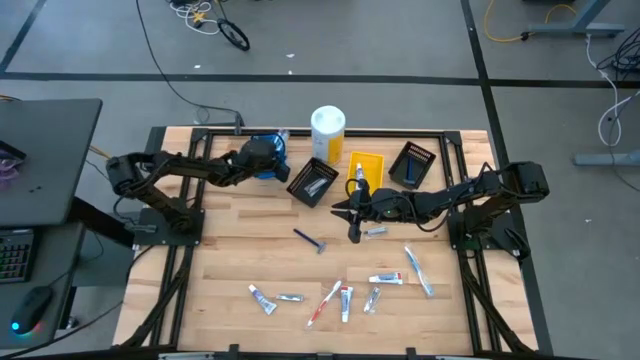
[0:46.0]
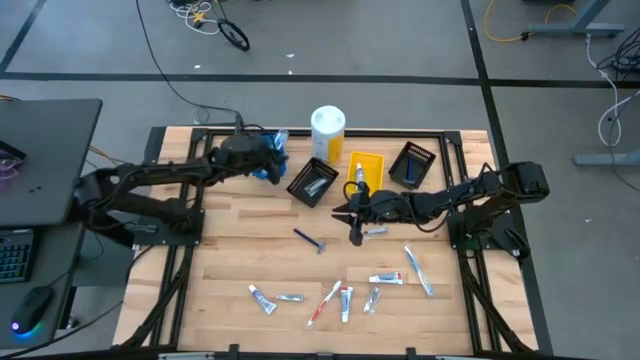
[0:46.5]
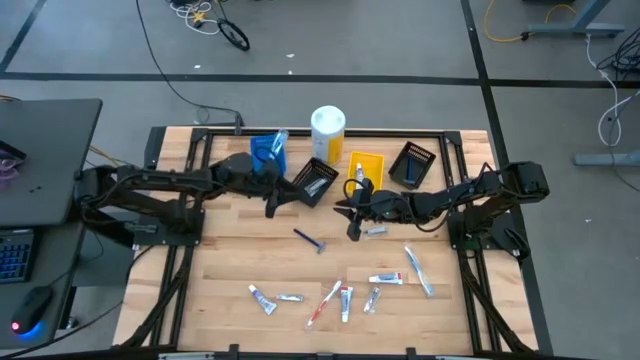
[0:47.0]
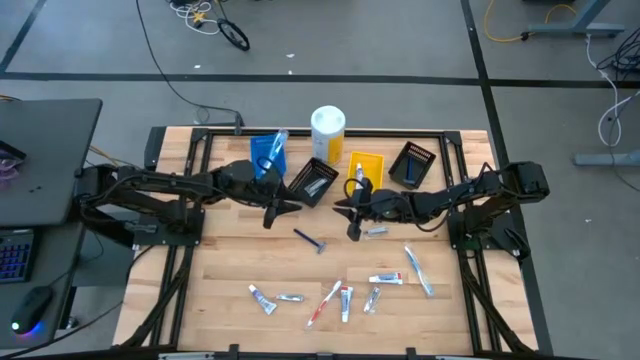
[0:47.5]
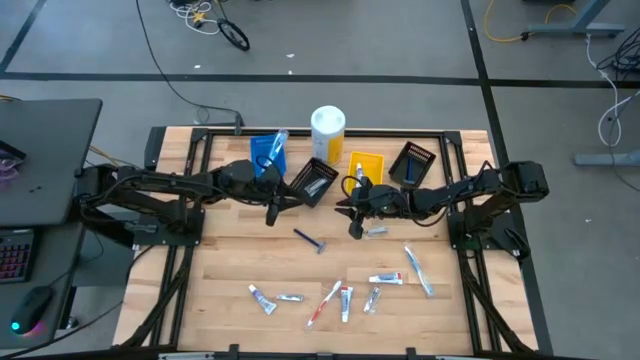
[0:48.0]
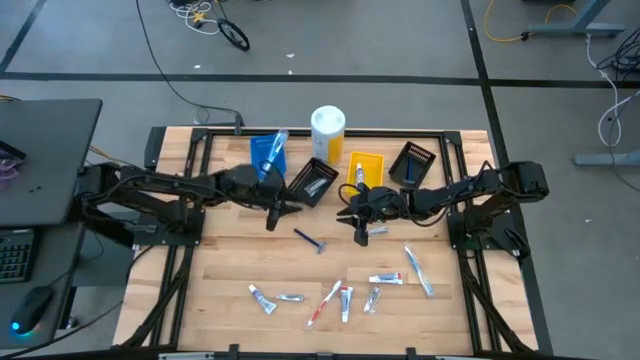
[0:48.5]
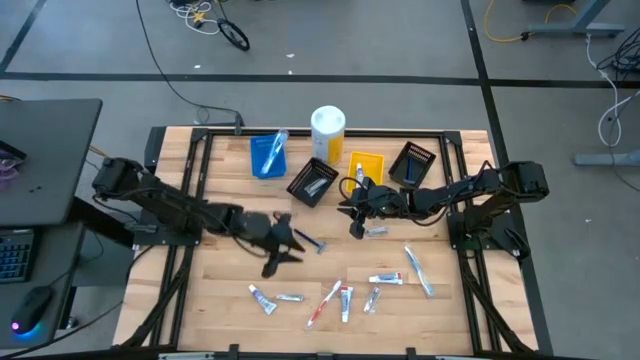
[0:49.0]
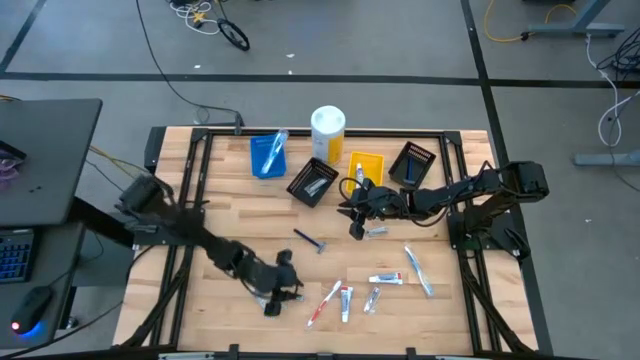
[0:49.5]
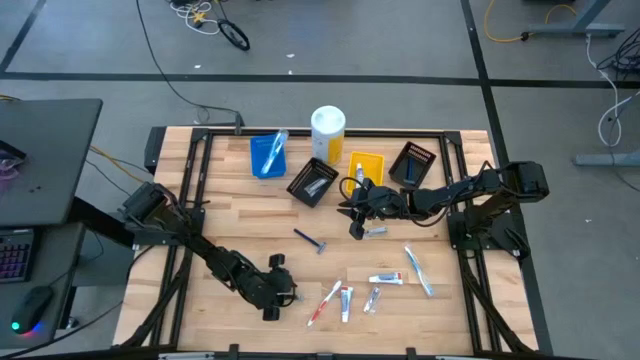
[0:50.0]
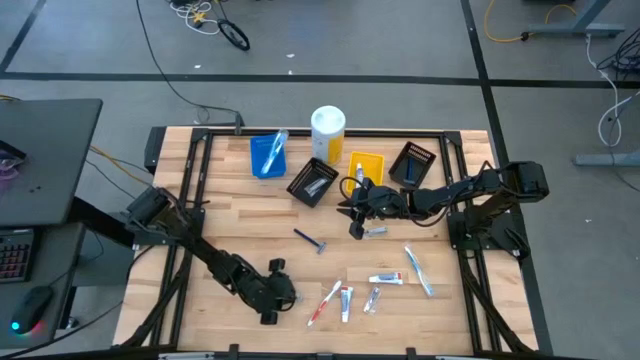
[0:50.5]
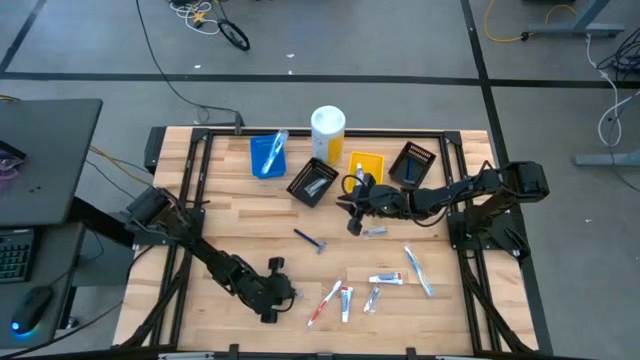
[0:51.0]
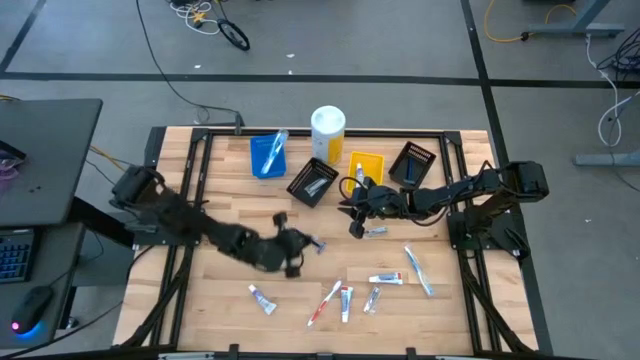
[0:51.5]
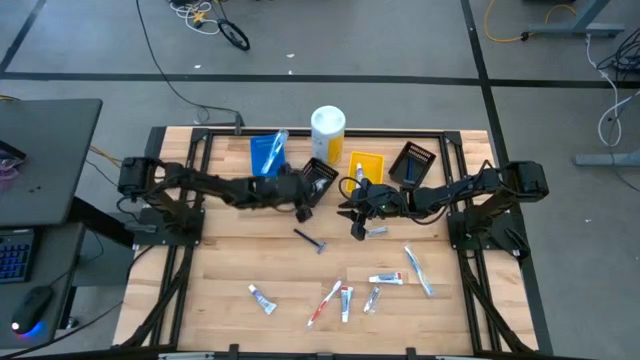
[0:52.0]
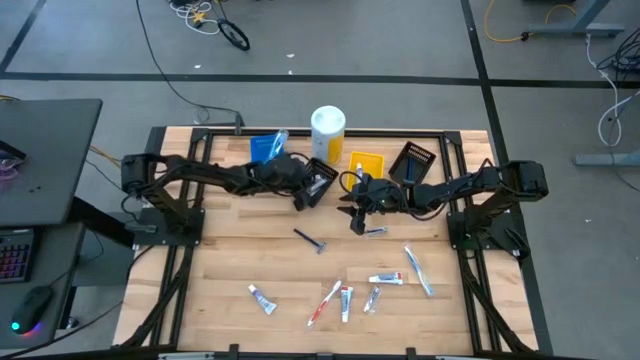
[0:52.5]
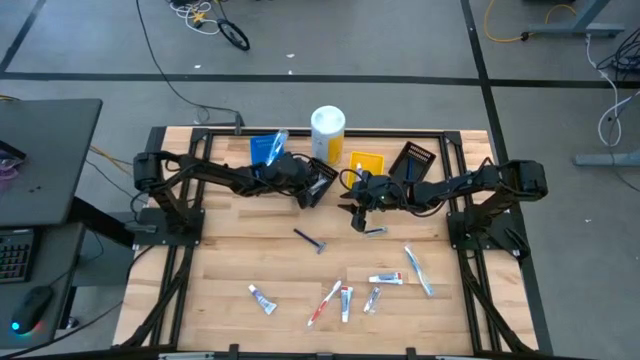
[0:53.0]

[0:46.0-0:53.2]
Task: Pick & Place Travel size toiletries
Put the silver nail cutter into the left black bin

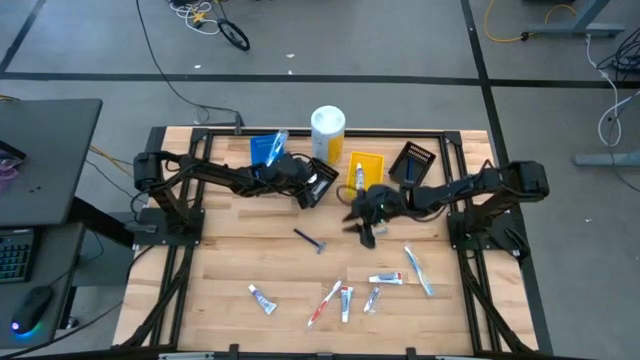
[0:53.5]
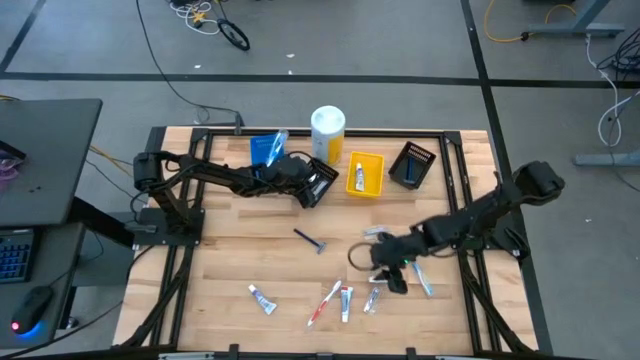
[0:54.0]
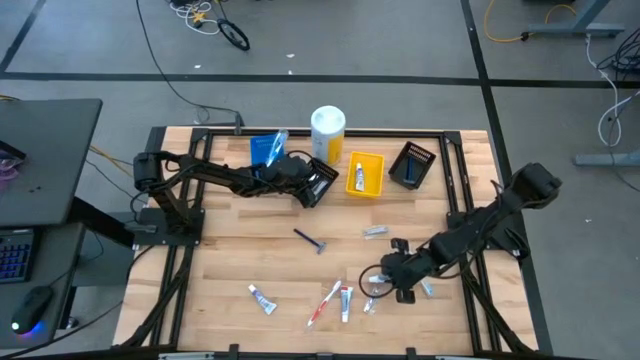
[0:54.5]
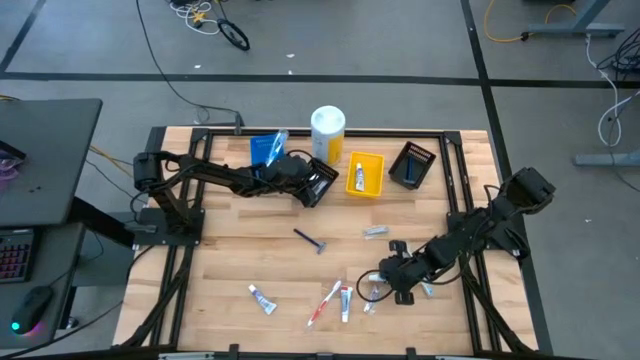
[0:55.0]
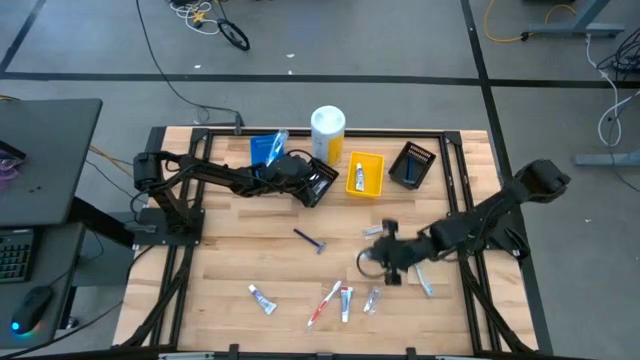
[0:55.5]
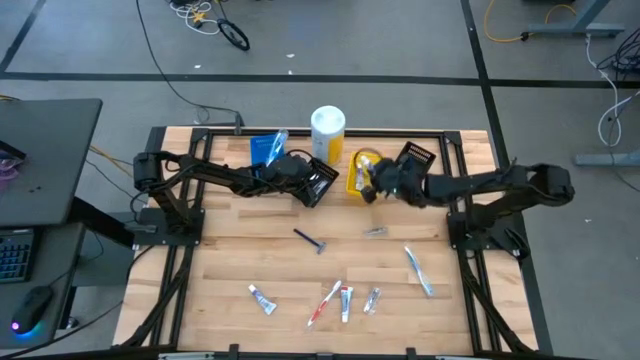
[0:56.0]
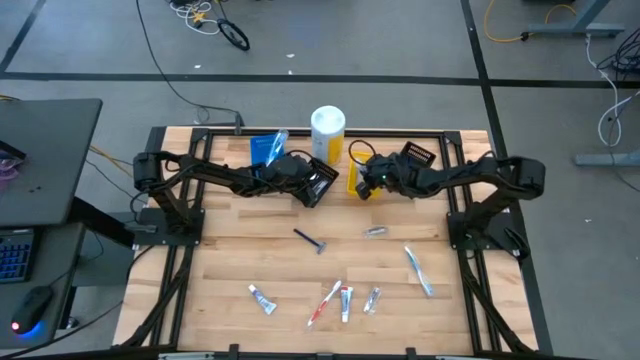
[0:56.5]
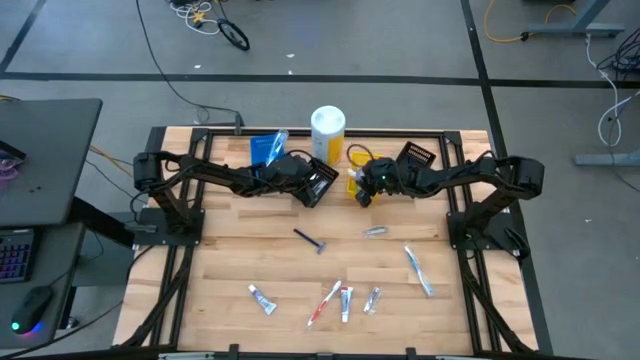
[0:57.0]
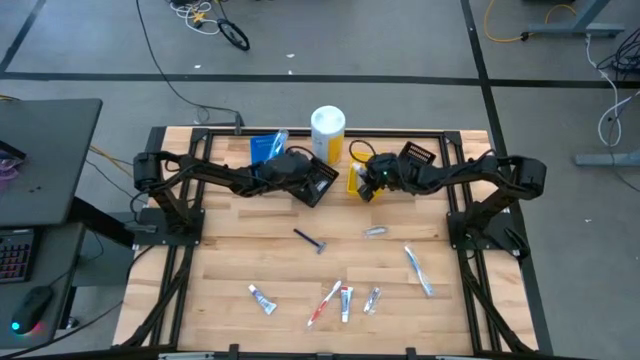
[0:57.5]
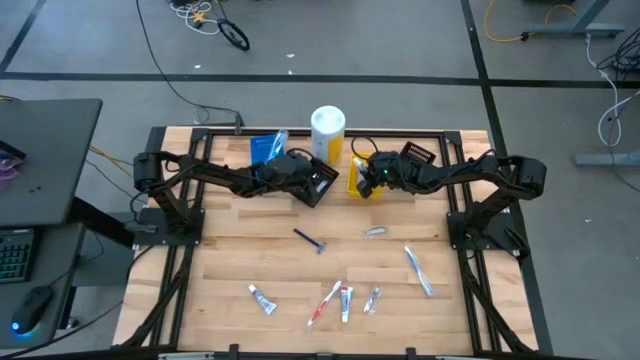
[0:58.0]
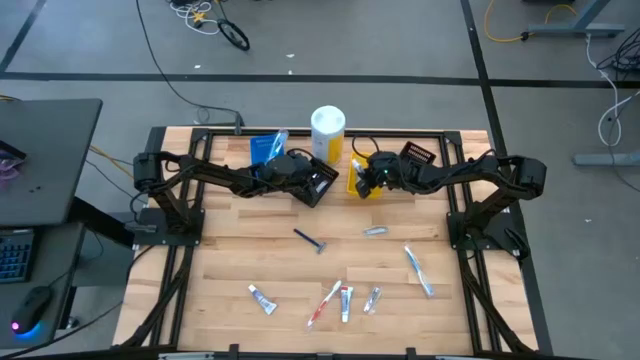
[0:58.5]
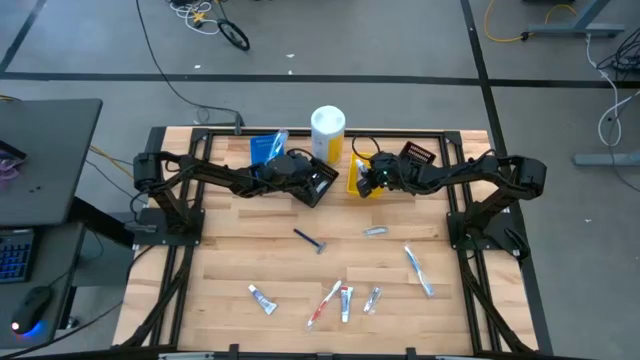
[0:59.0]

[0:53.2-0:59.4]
Put the toothpaste into the yellow bin

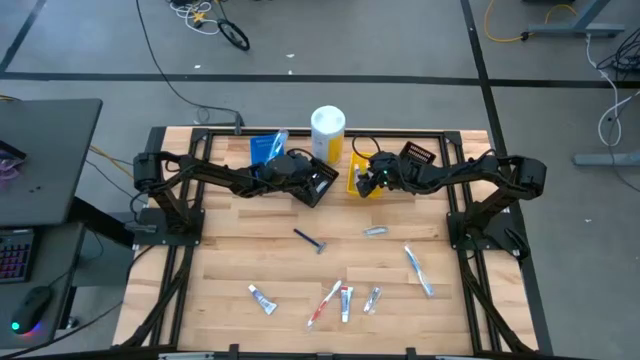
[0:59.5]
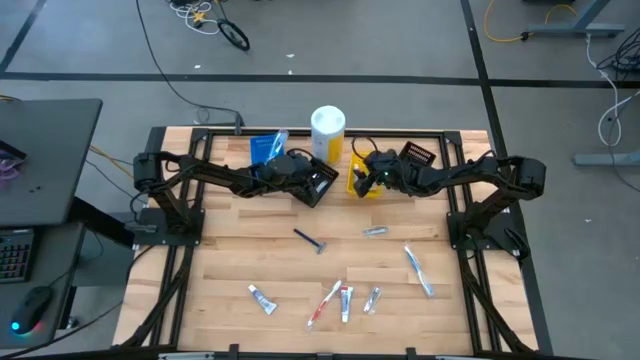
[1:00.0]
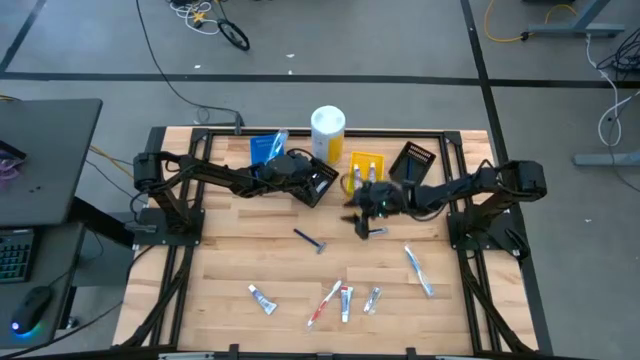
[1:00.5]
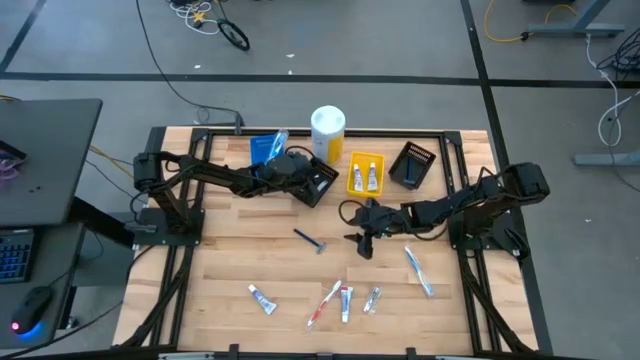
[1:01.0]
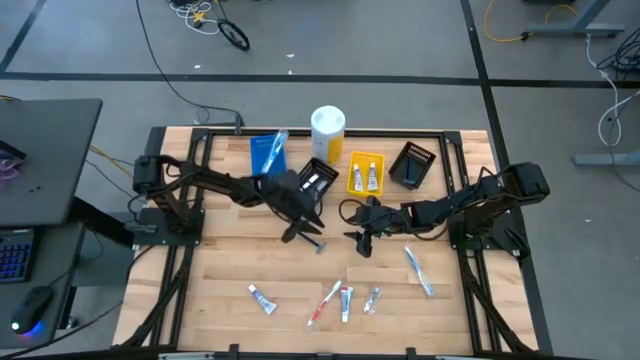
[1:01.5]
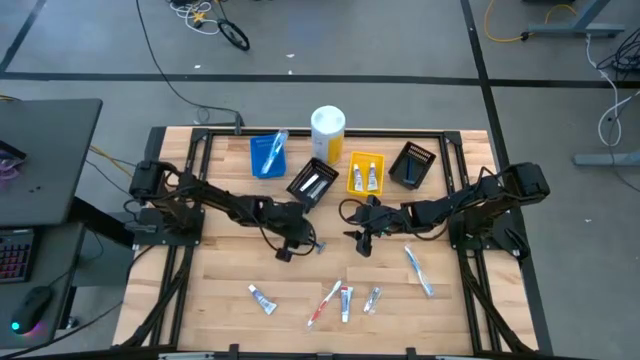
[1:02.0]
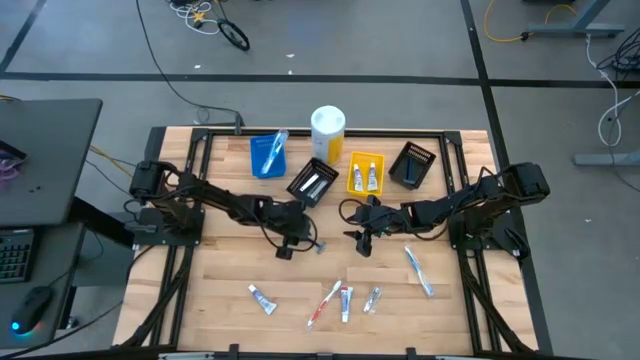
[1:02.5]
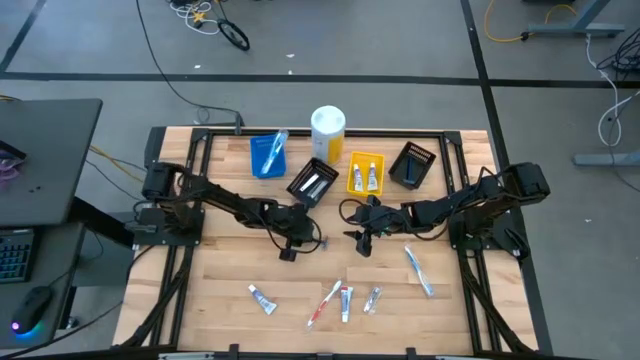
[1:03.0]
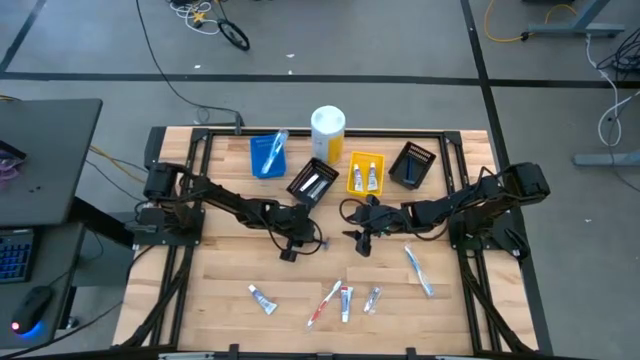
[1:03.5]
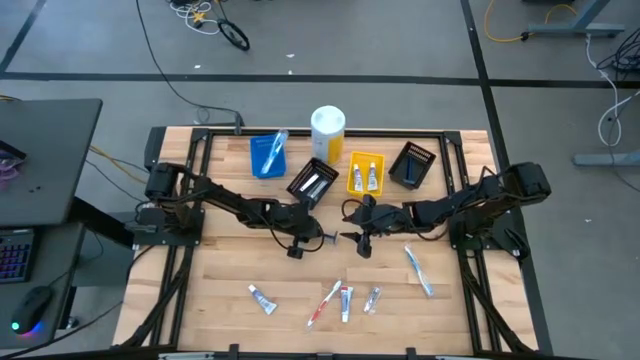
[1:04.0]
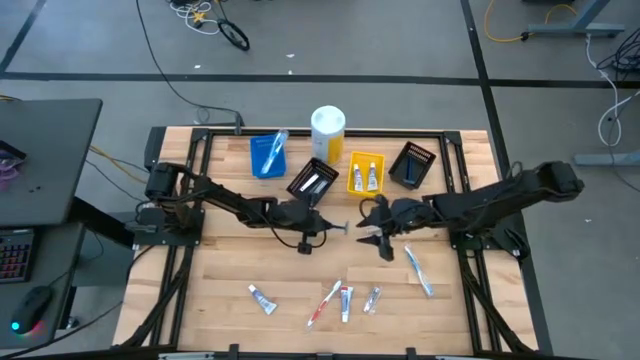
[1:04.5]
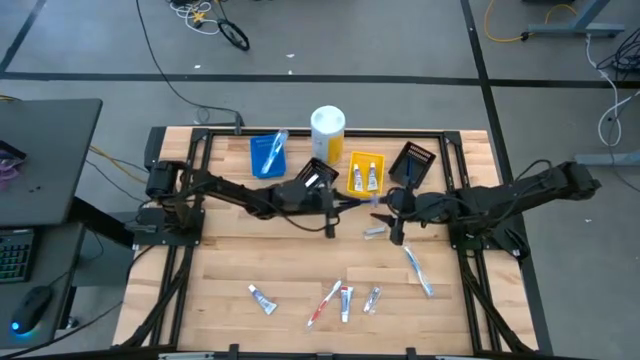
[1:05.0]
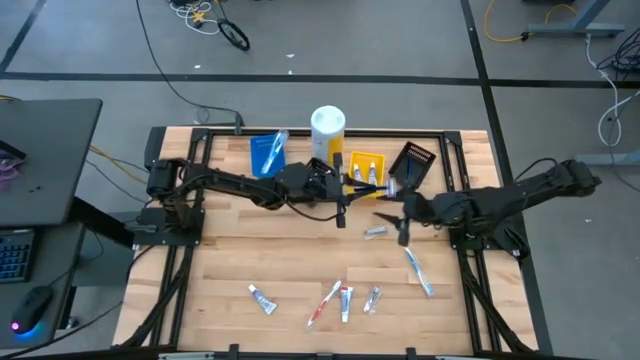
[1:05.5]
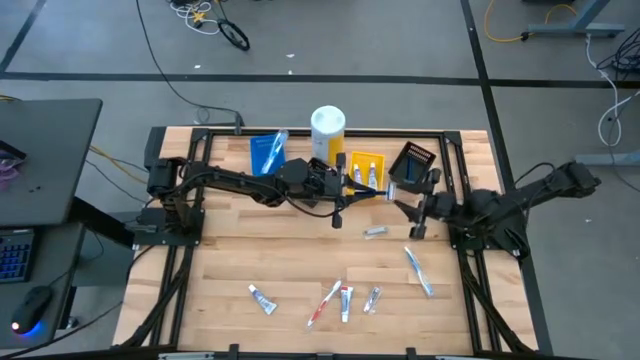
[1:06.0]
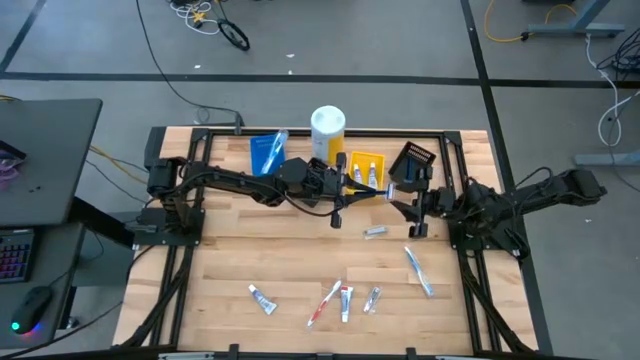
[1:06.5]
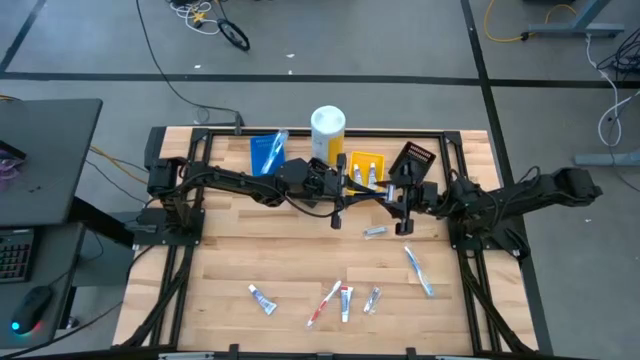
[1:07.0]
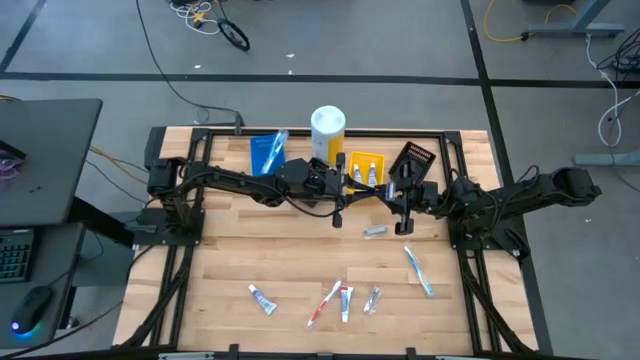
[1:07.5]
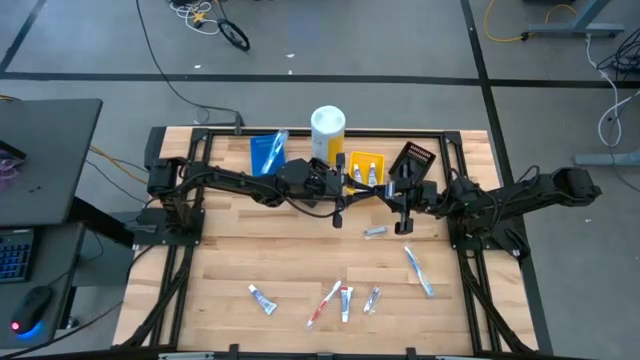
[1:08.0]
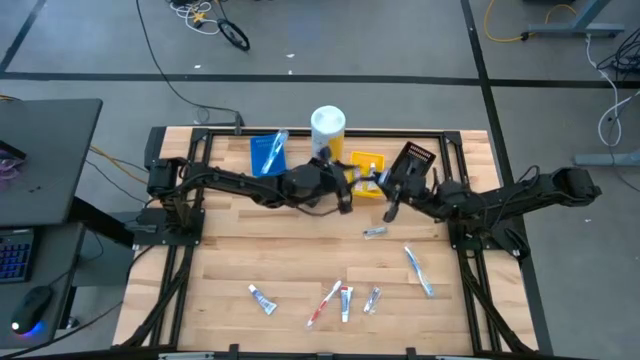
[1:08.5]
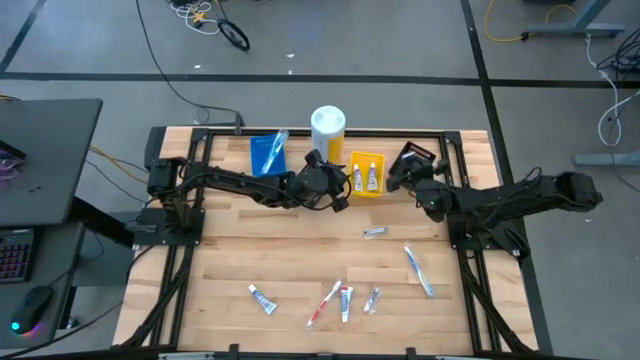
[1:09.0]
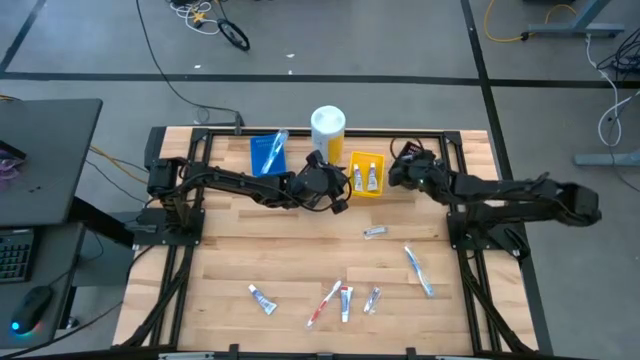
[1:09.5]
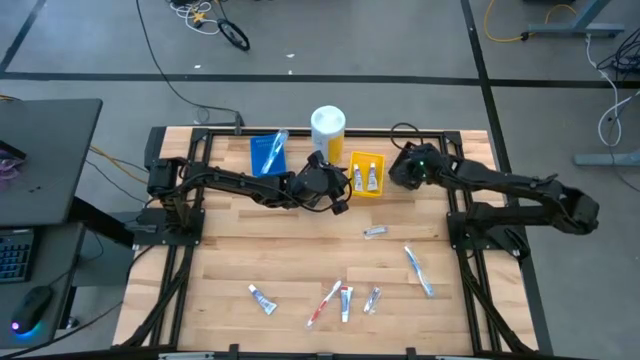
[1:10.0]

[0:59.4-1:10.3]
Put the razor into the right black bin
